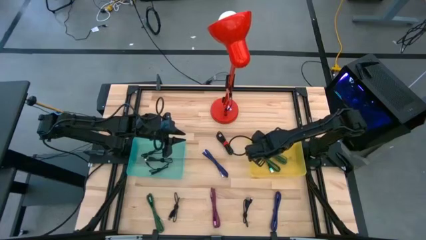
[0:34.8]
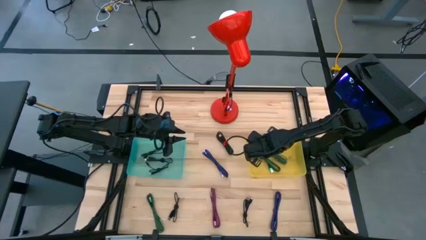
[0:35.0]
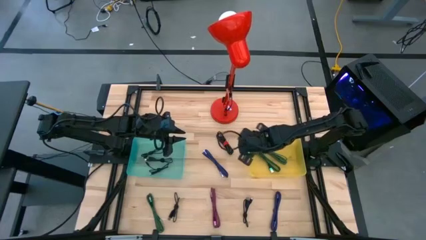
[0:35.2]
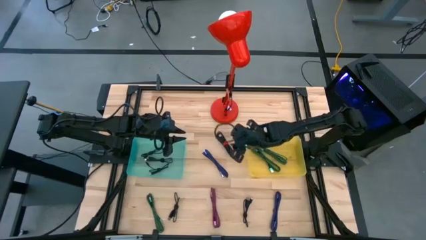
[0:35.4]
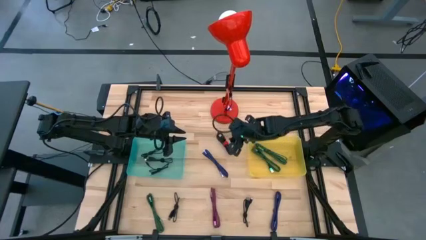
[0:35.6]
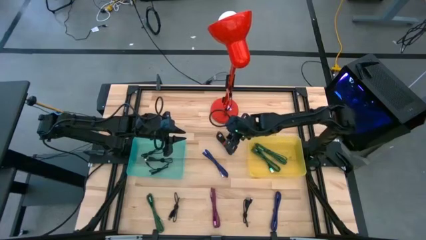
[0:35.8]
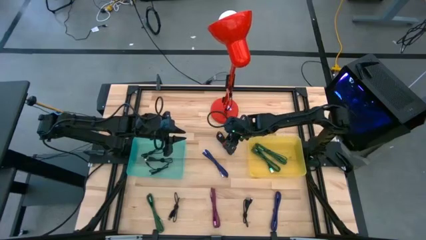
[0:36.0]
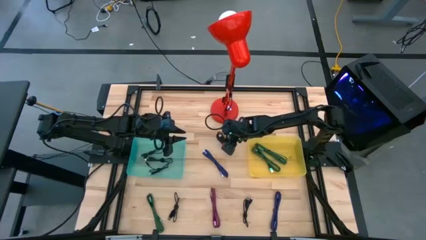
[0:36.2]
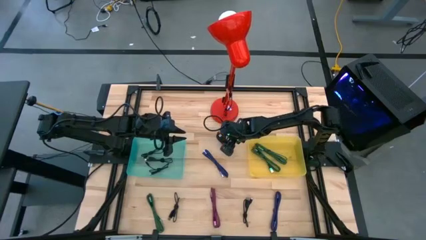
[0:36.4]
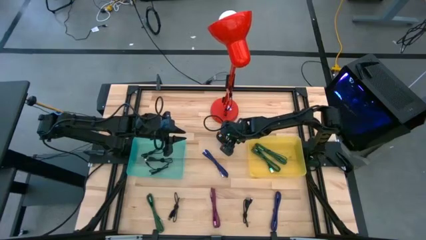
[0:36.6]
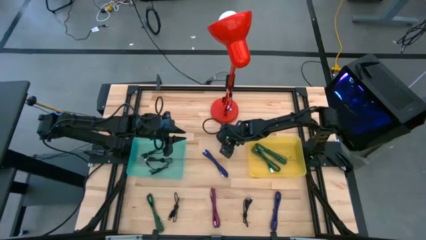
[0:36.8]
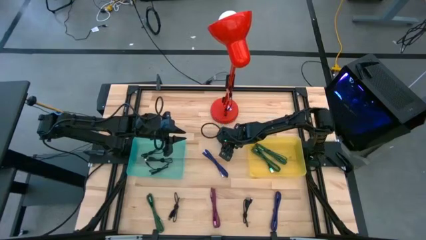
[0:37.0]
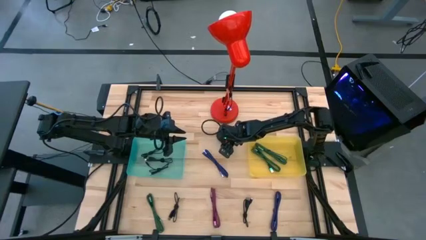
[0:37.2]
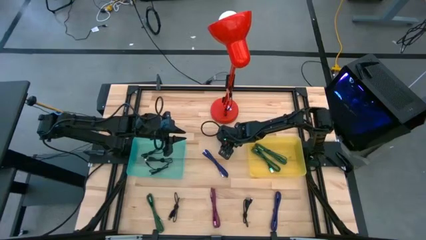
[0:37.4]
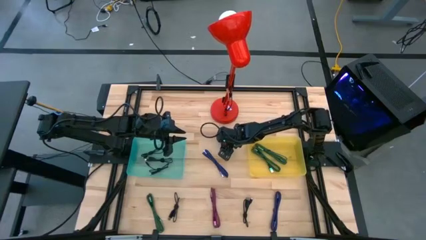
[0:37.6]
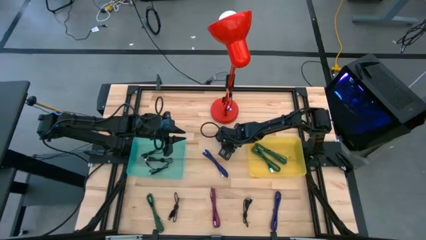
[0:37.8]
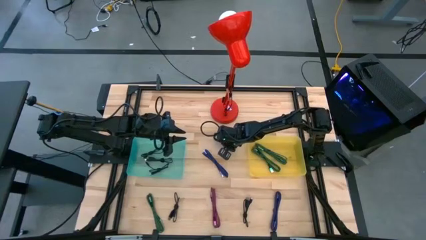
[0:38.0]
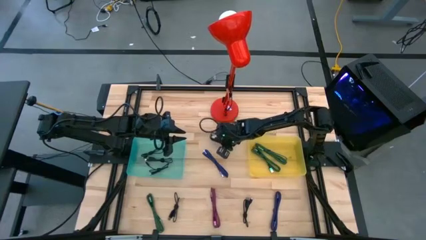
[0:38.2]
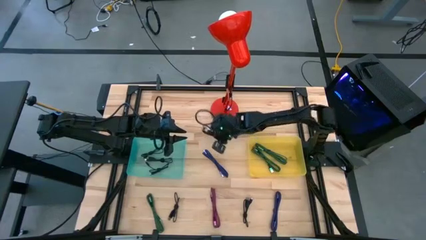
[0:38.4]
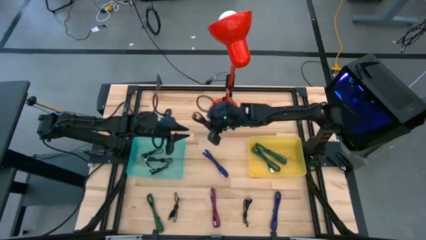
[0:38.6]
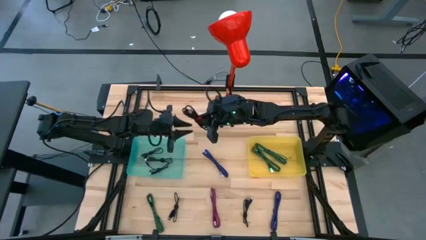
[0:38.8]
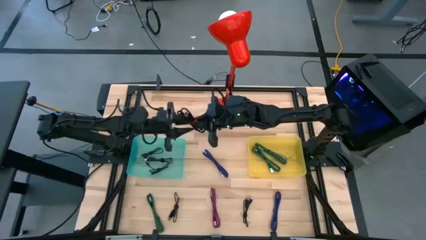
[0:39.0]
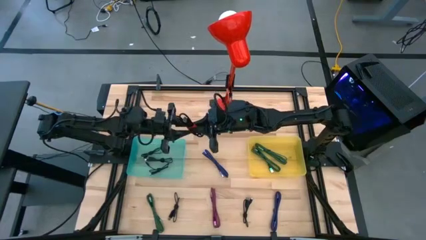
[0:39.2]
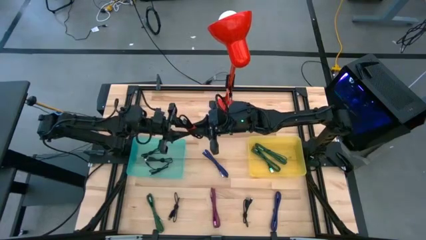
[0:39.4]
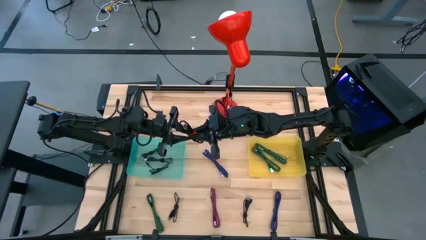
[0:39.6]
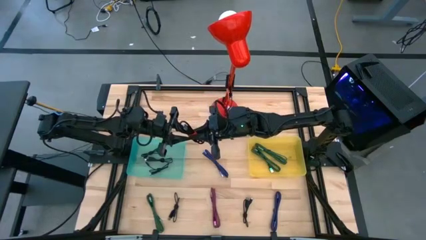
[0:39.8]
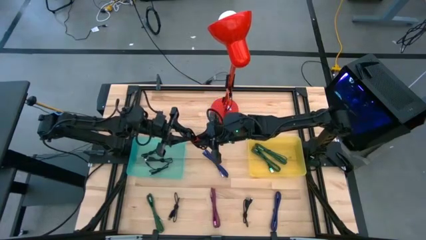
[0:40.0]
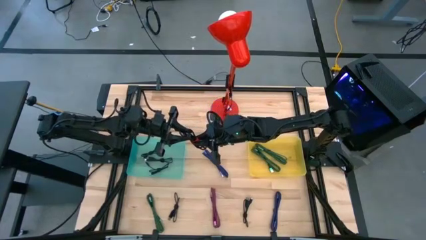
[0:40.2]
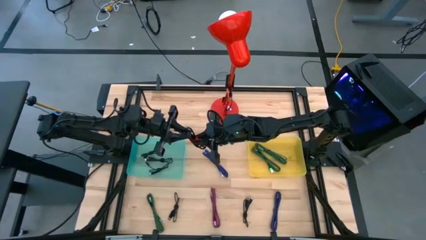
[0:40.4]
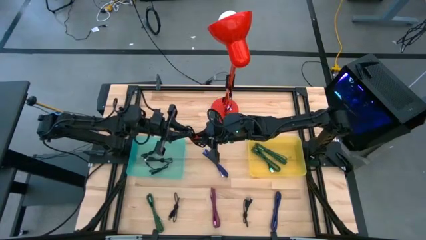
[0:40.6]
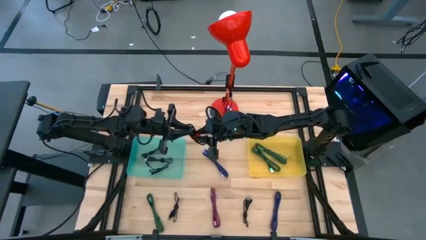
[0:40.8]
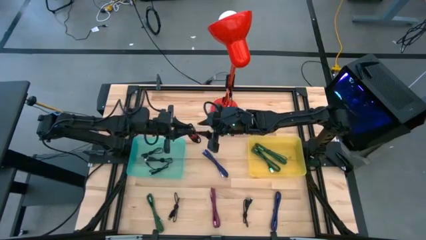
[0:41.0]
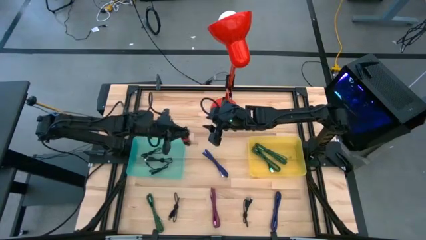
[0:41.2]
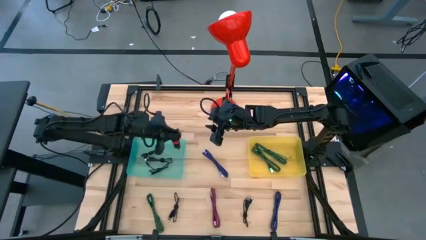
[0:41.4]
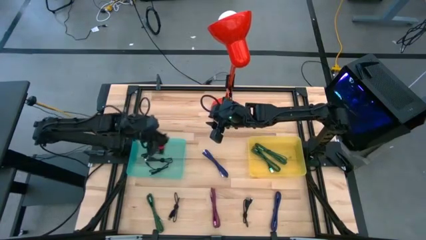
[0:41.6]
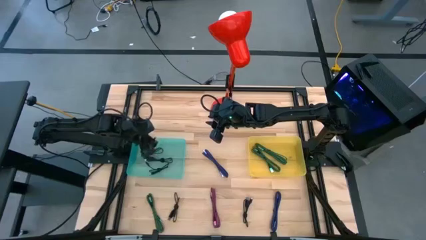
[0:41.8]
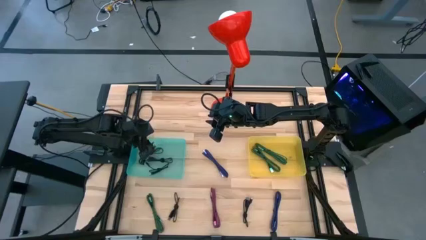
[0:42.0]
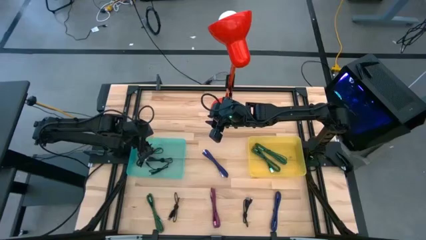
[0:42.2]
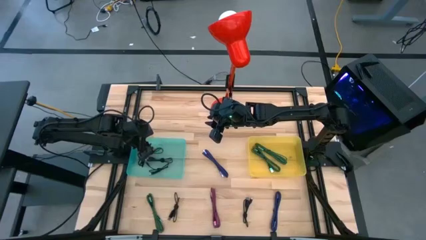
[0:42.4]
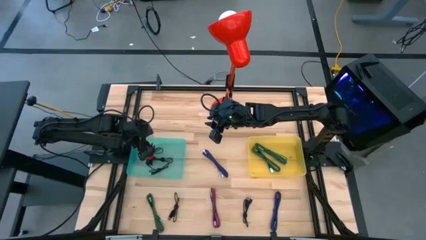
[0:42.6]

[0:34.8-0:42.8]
Task: Pick & Place USB Port
Put the black charger cable into the green bin

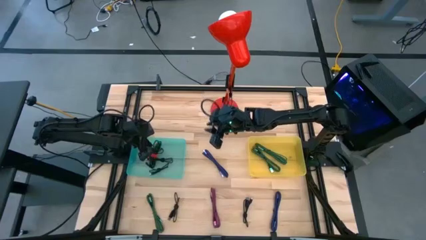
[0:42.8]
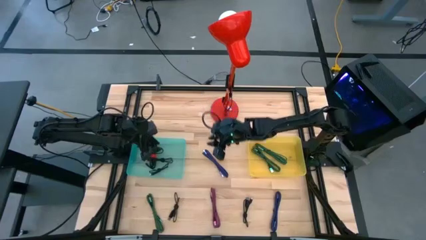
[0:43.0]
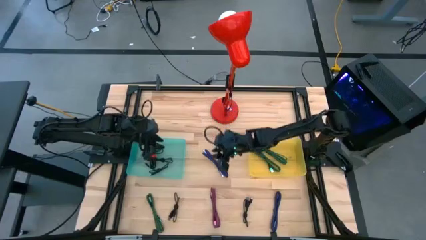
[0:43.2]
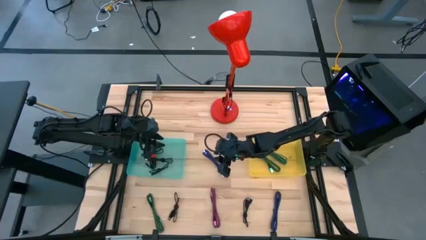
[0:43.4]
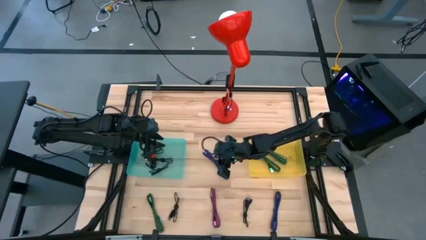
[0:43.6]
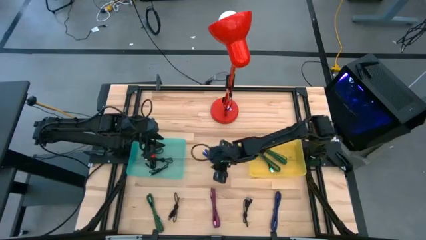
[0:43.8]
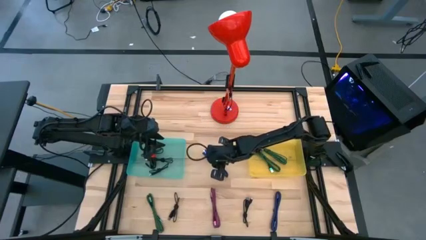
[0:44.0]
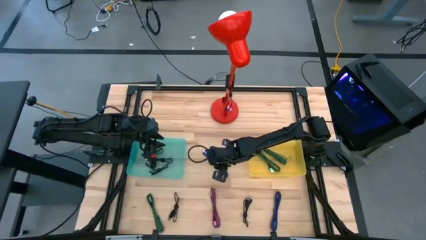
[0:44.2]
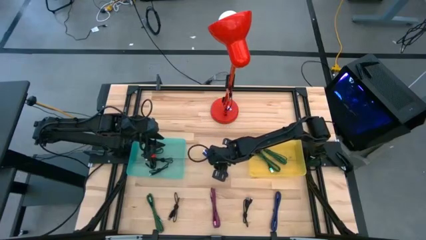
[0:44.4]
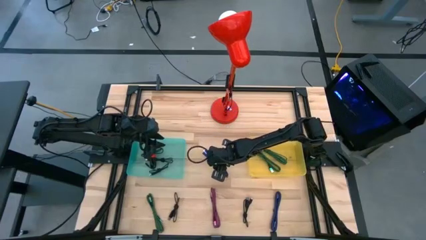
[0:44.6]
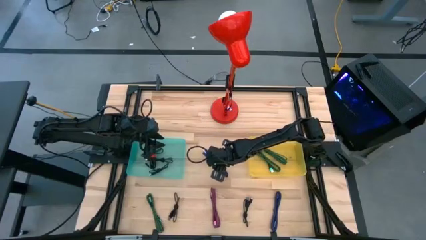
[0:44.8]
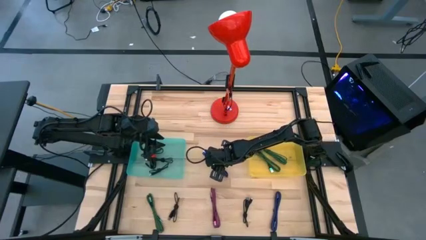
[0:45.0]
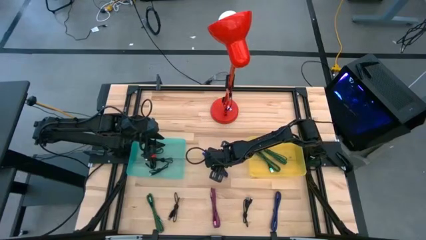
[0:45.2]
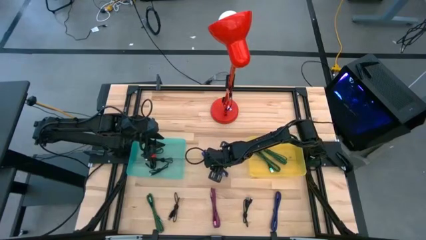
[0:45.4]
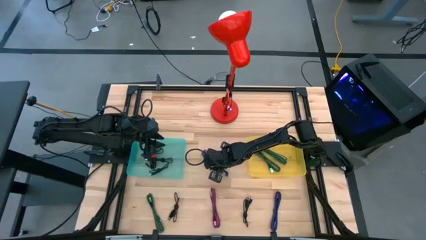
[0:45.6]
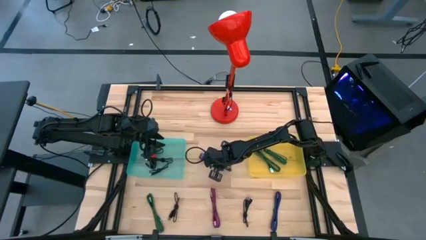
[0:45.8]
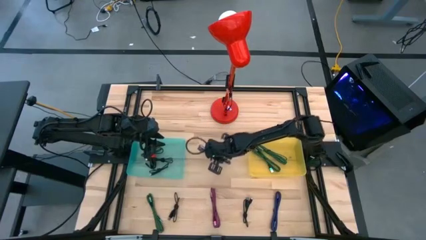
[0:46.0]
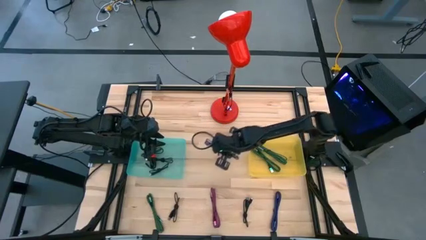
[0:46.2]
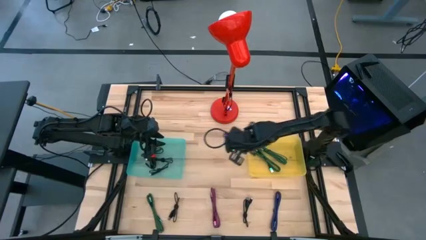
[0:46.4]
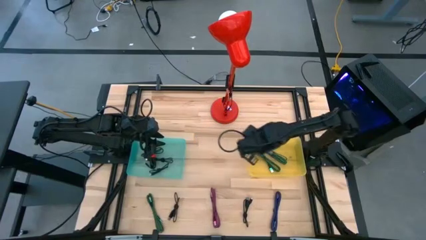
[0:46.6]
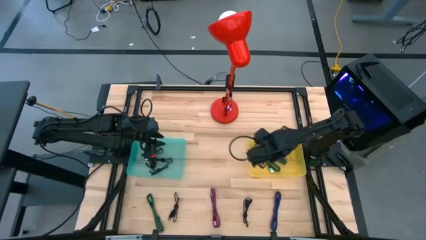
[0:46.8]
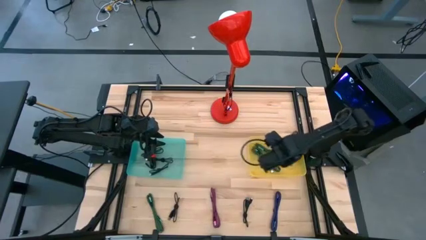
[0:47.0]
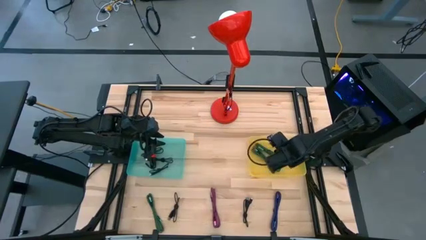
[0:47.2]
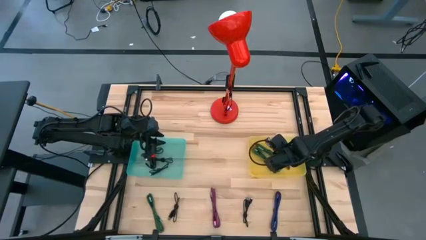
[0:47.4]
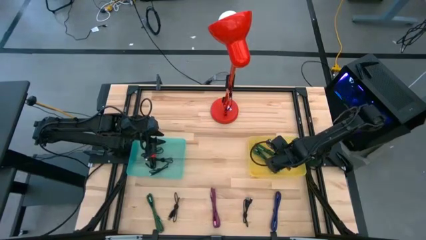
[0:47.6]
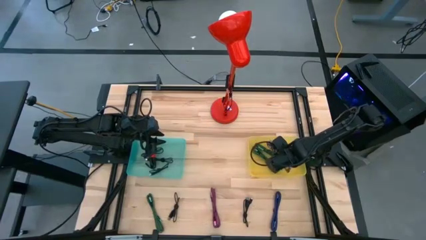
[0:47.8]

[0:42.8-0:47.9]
Put the purple charger cable into the yellow bin

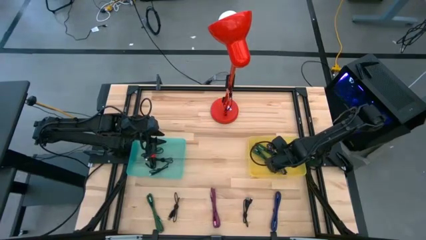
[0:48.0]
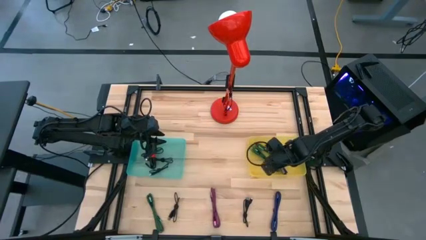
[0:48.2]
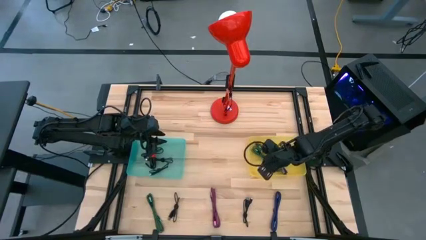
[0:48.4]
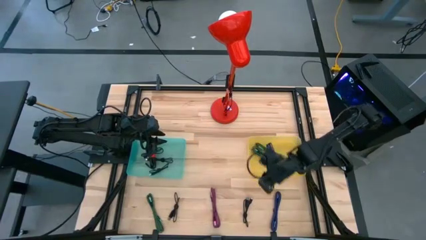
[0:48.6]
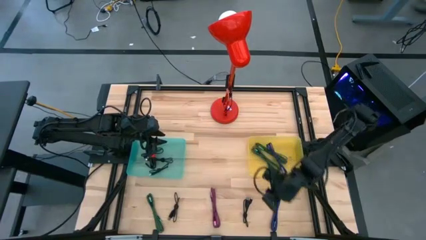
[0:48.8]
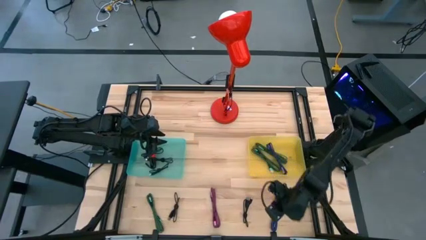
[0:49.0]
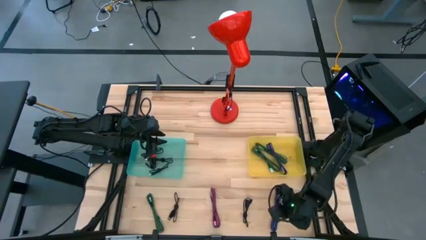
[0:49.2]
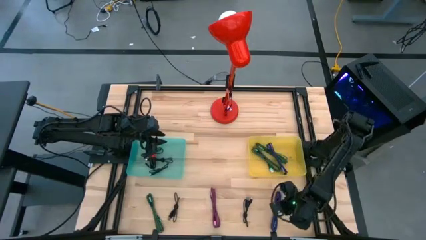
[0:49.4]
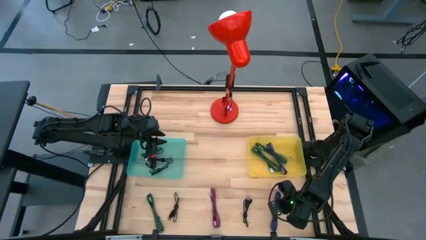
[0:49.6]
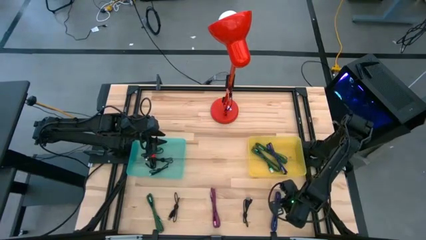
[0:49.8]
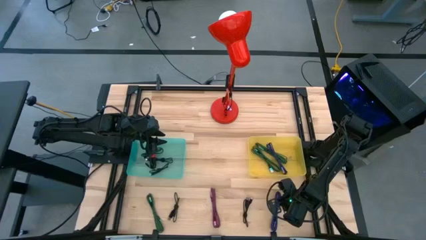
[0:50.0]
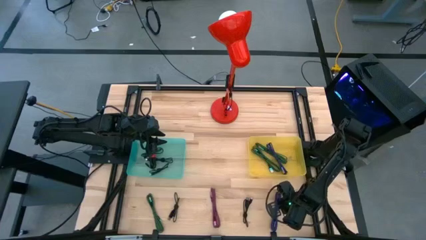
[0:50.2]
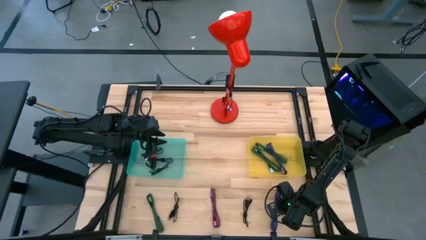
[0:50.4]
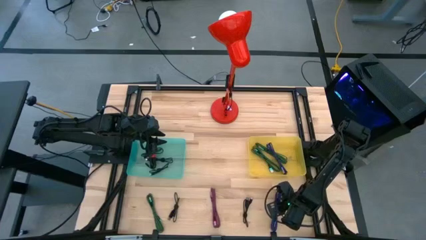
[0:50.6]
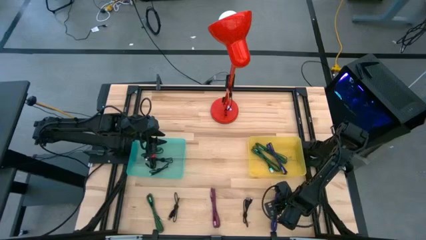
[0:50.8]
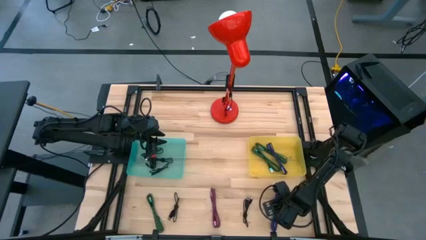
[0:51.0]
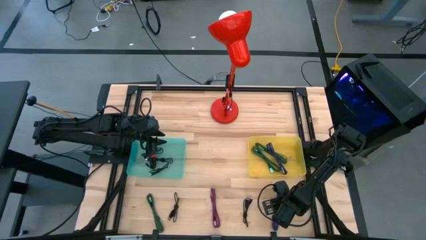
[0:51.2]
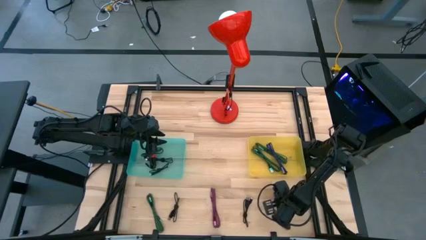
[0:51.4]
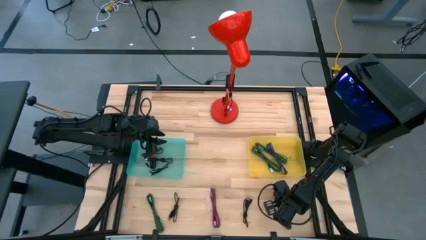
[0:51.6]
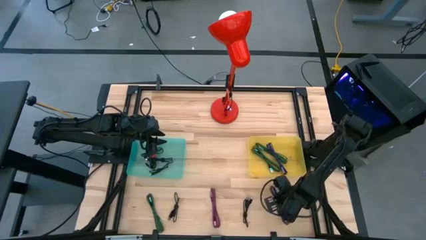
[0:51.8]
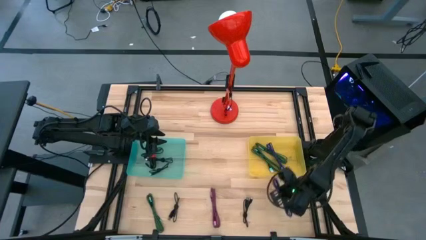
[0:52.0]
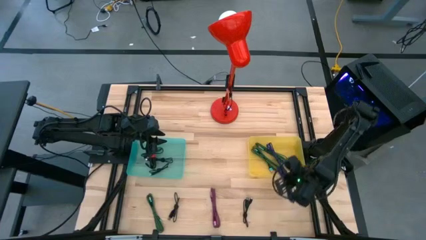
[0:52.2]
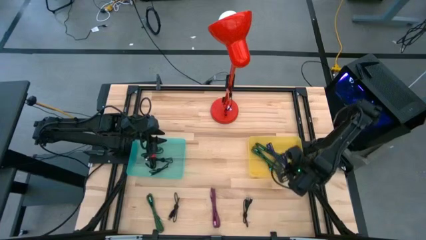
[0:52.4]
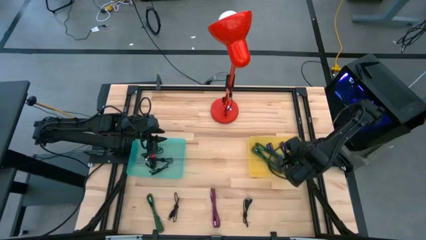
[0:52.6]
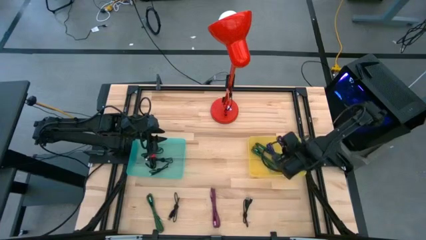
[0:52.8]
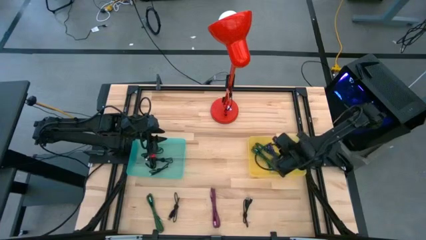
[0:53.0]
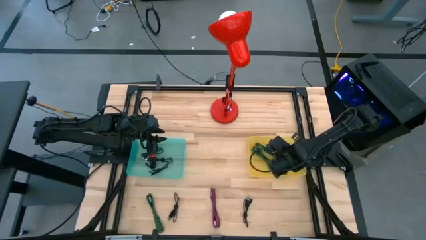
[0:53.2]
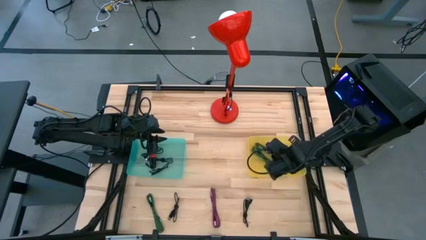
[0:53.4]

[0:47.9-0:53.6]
Put the purple charger cable into the yellow bin
